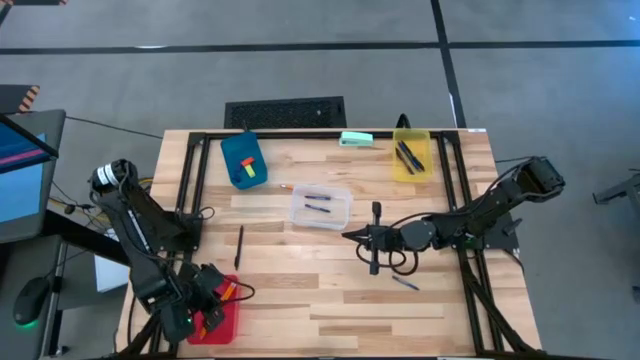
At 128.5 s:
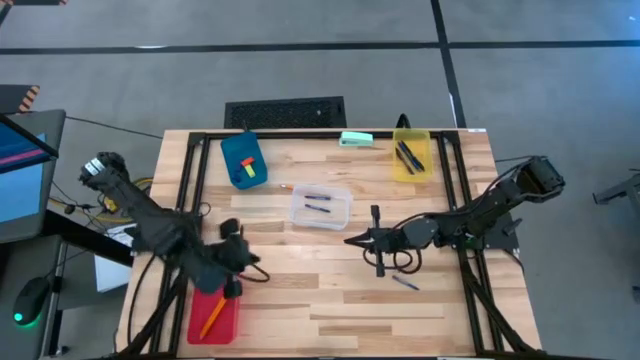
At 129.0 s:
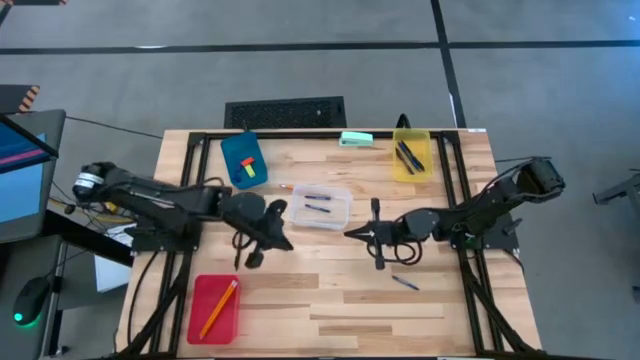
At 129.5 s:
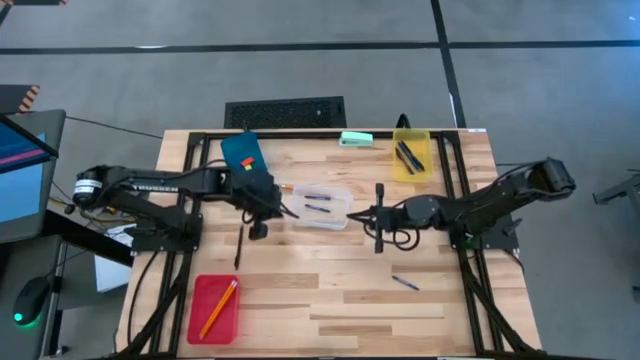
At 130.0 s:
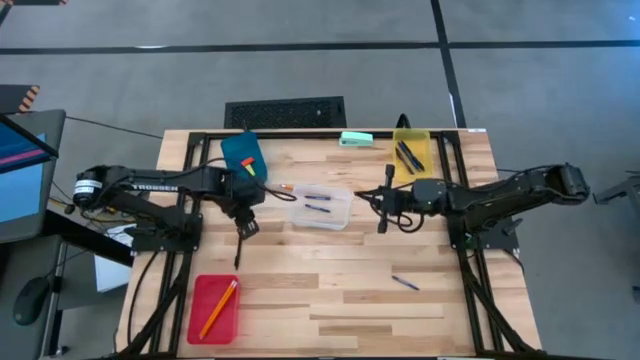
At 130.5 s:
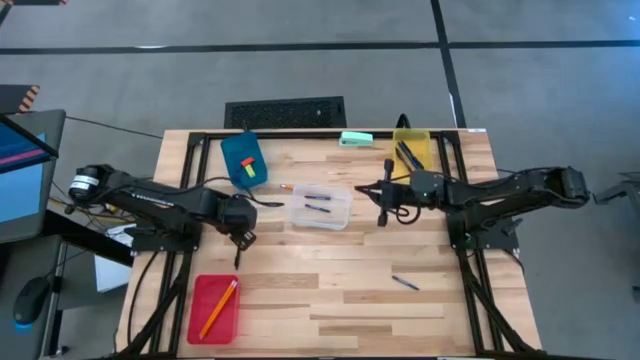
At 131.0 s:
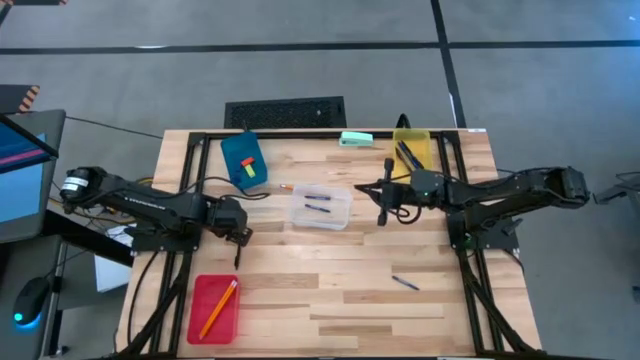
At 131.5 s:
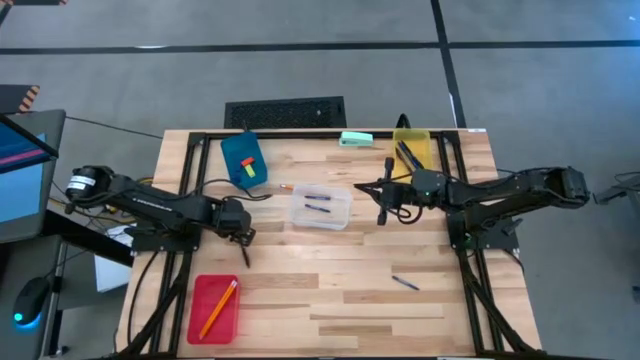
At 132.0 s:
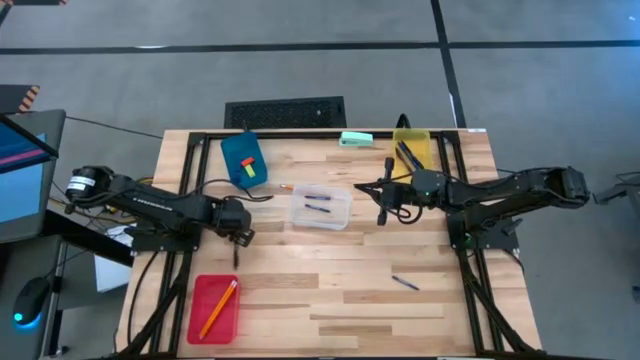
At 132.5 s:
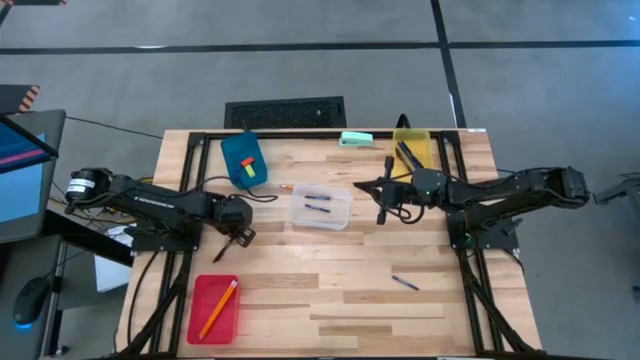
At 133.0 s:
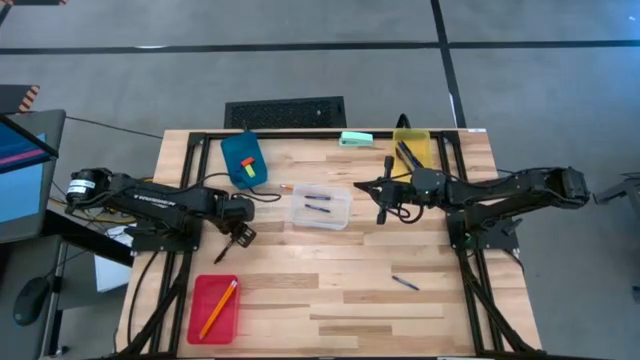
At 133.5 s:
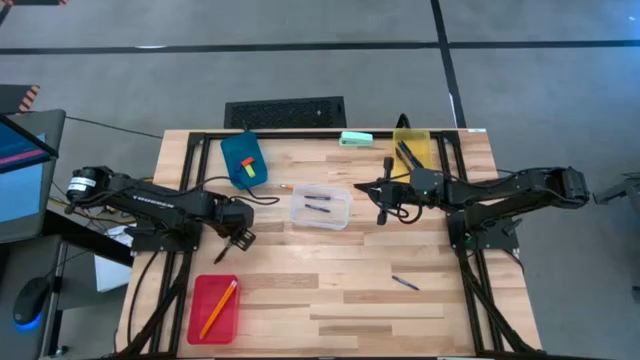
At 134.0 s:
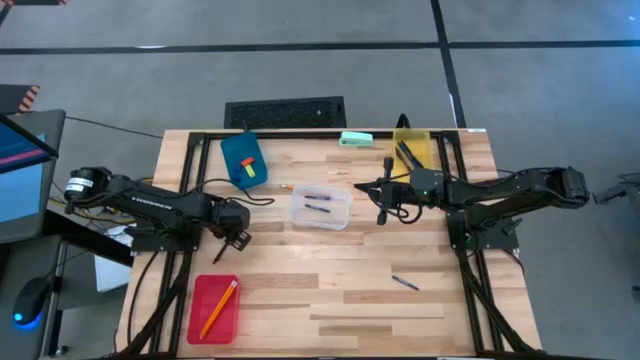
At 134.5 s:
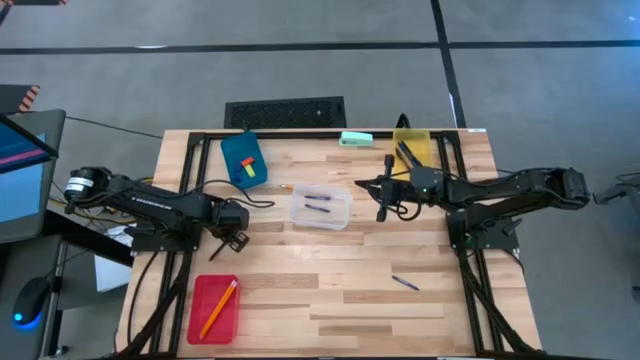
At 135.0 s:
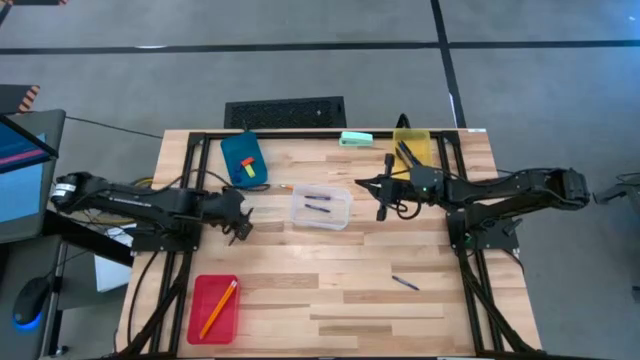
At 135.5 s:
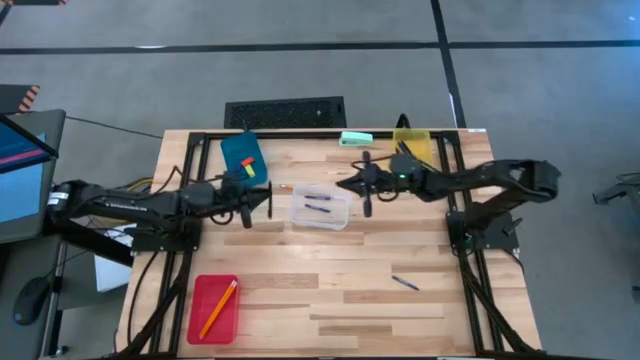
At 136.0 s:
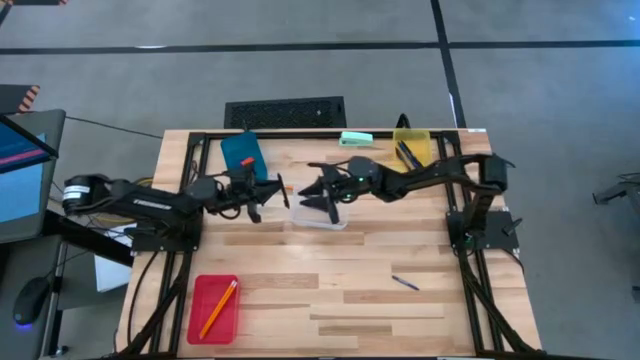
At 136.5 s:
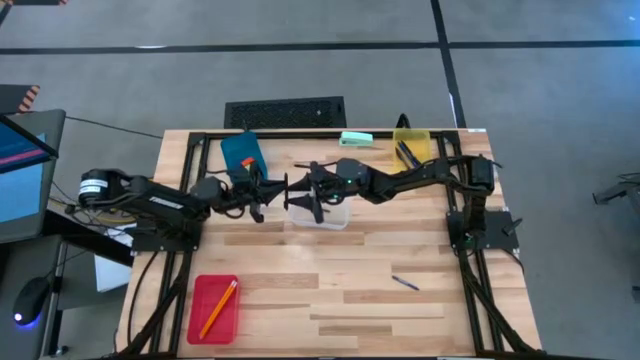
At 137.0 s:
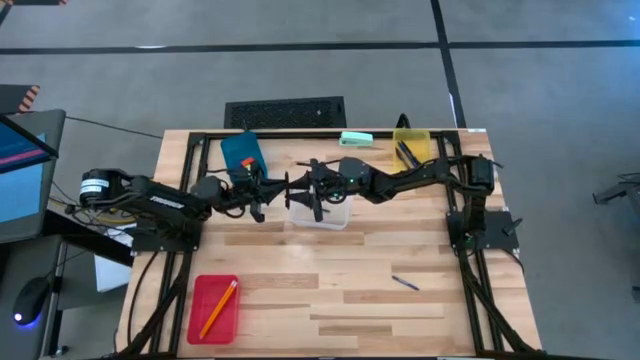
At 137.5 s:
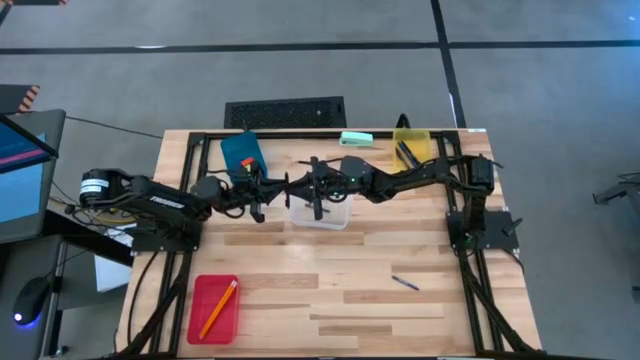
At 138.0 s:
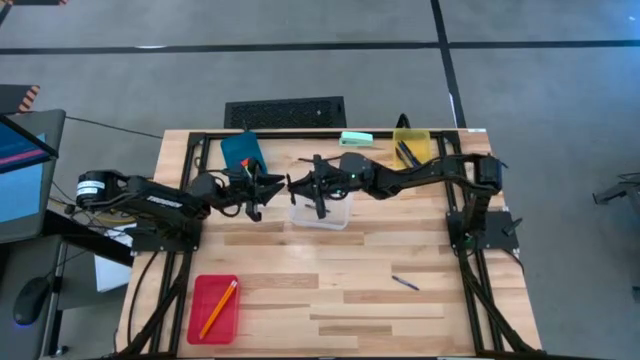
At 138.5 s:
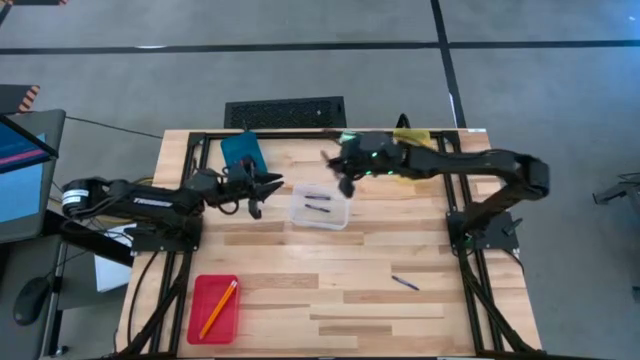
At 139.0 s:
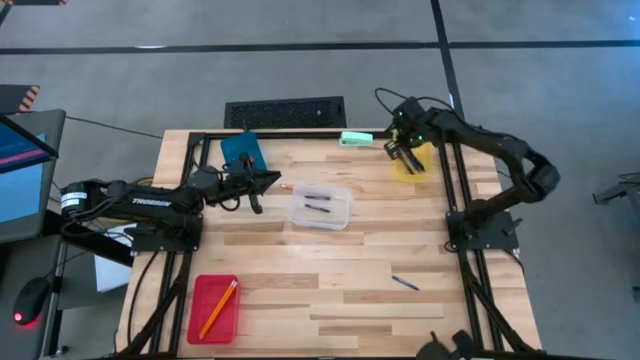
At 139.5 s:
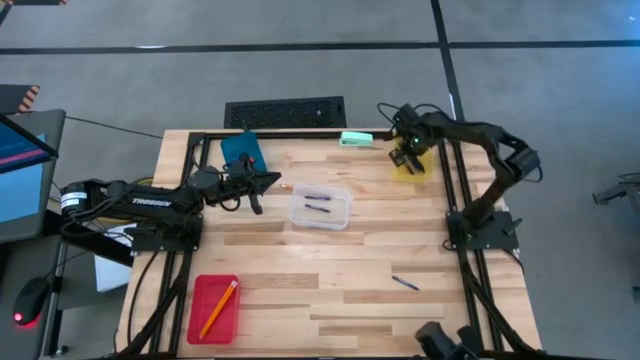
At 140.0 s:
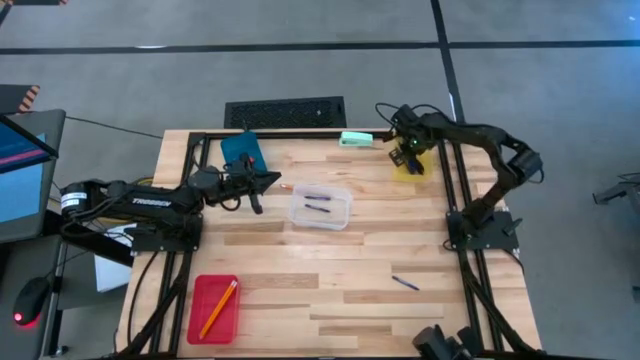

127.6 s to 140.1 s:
Task: Sort crayons/erasers/pens/pencils in bins
Put the black pen into the yellow bin

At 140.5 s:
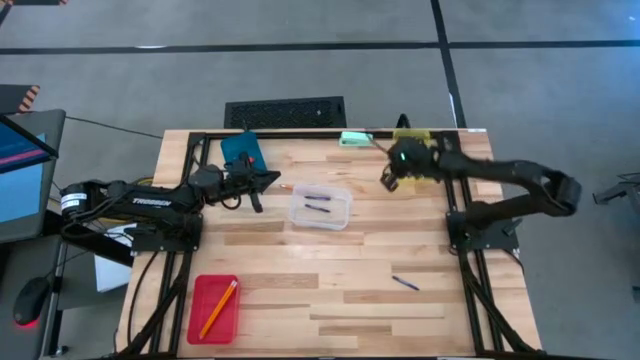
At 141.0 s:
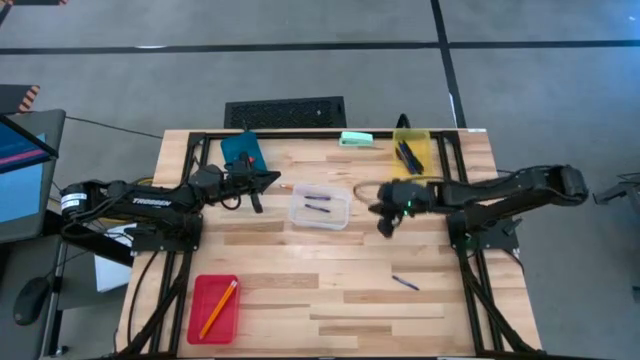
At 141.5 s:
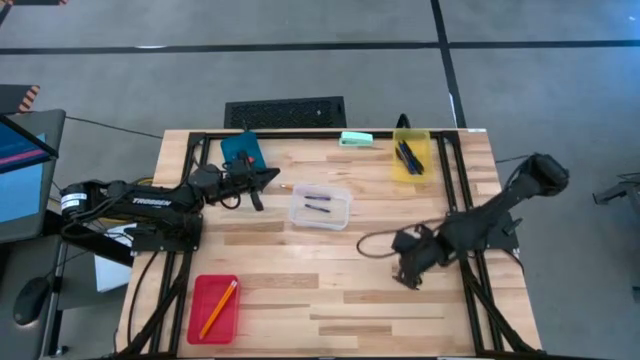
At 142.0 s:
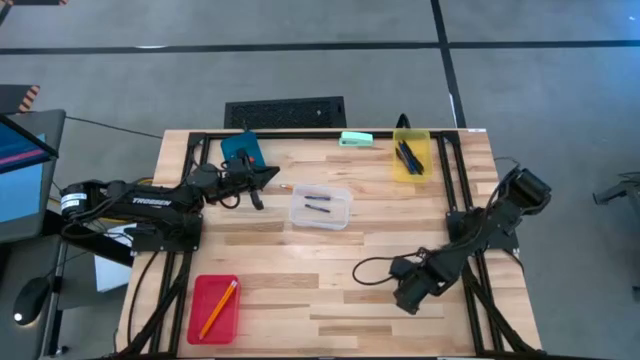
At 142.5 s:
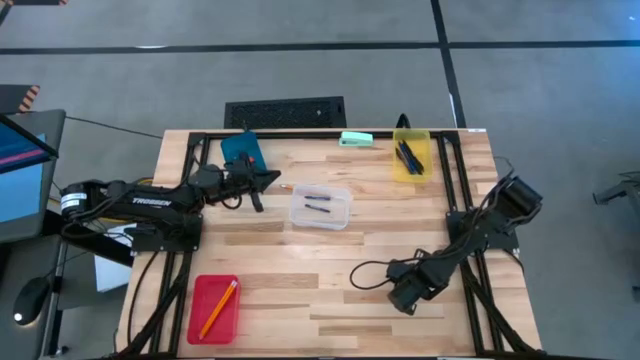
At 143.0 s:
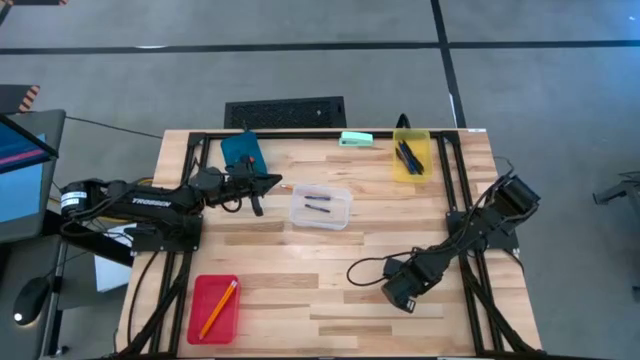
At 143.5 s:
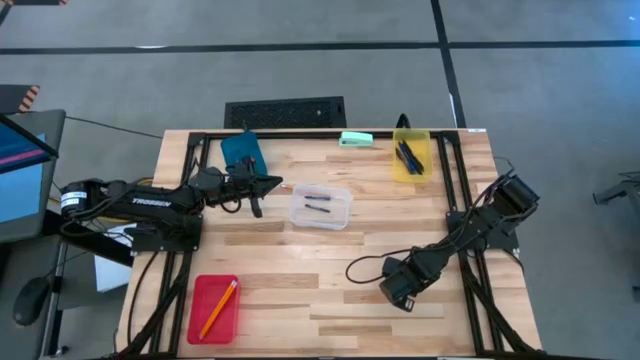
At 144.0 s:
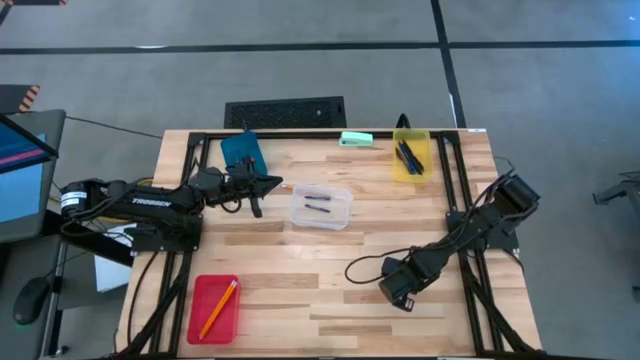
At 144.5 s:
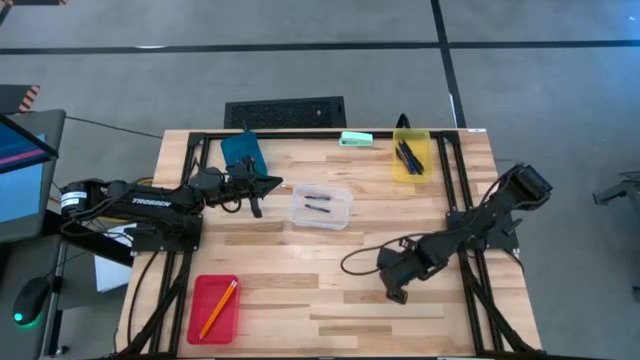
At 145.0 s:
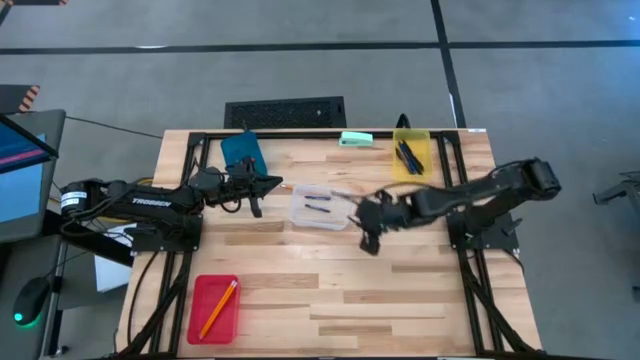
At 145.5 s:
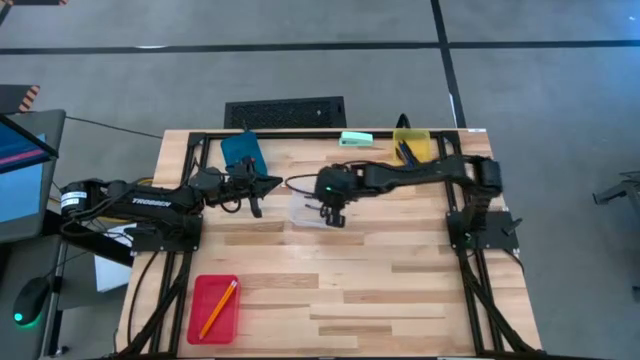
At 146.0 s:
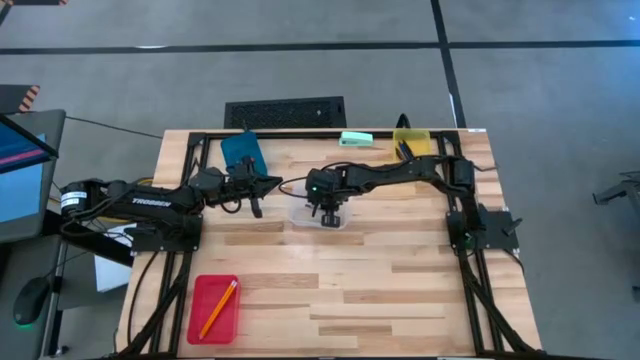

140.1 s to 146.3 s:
Put the blue crayon into the transparent bin
